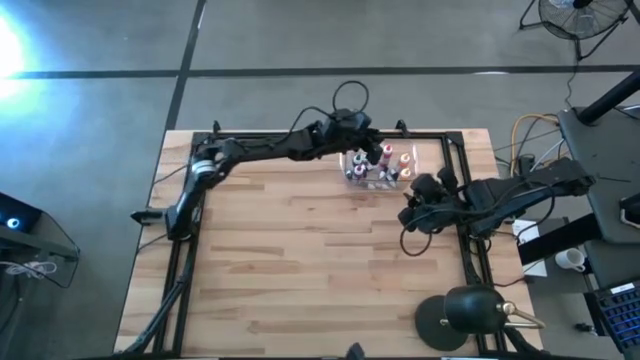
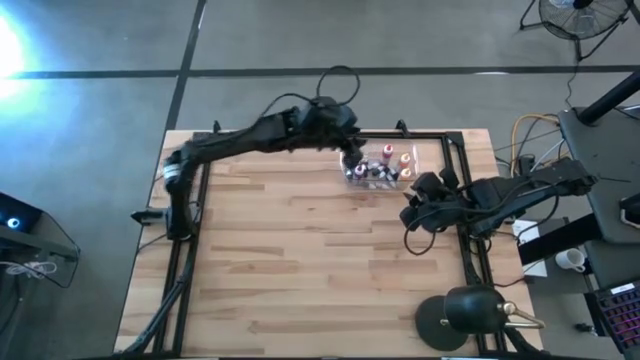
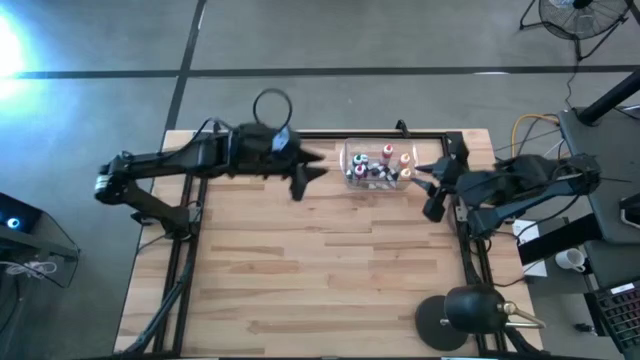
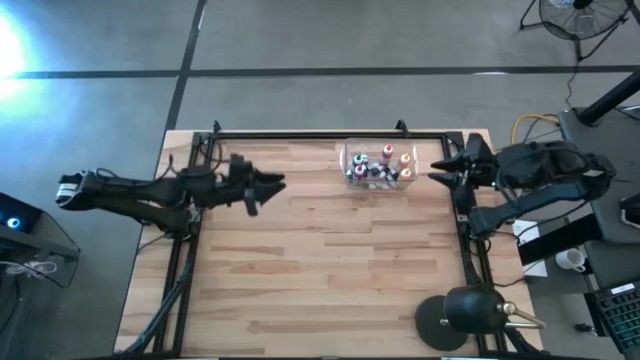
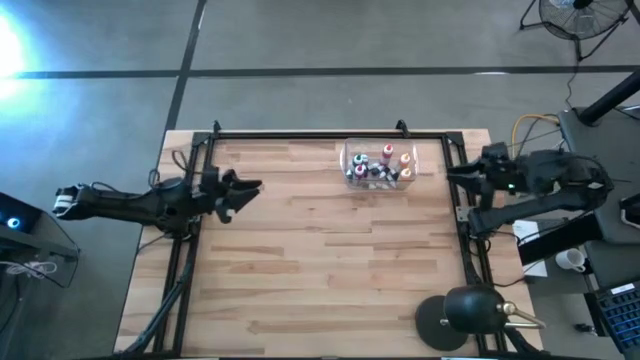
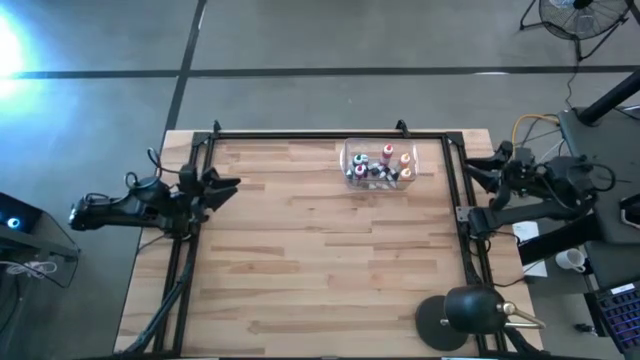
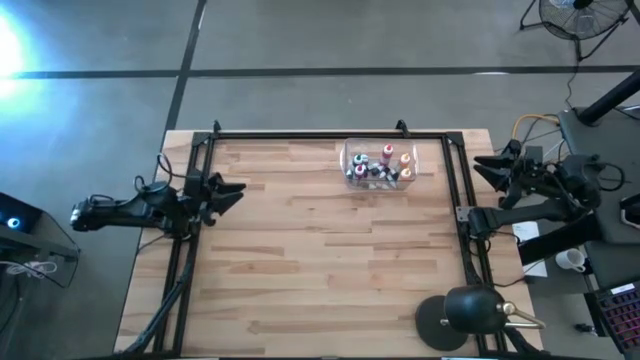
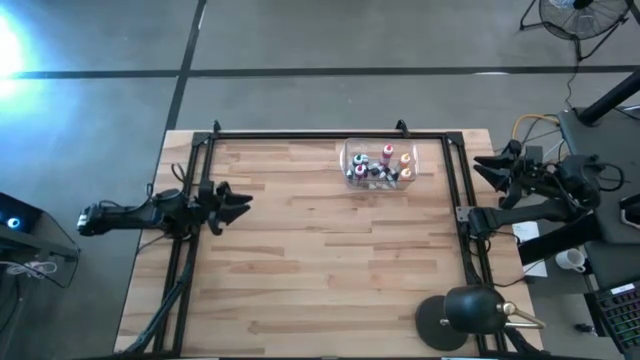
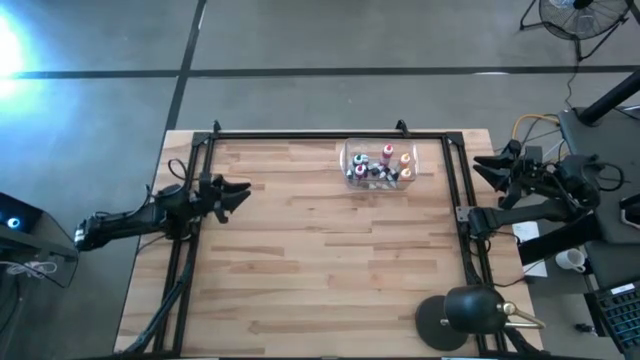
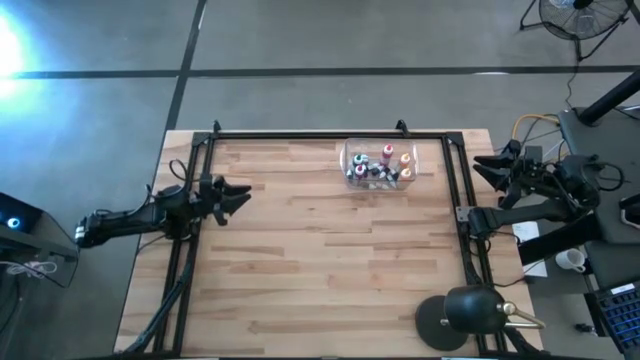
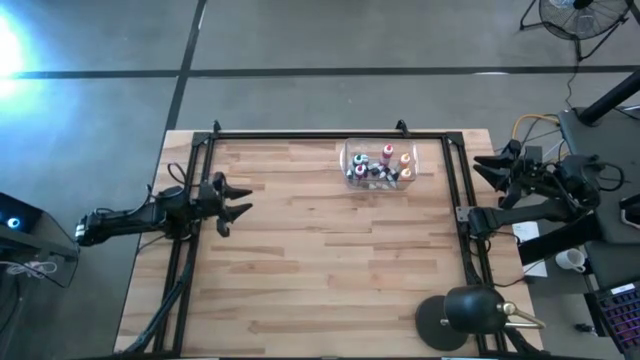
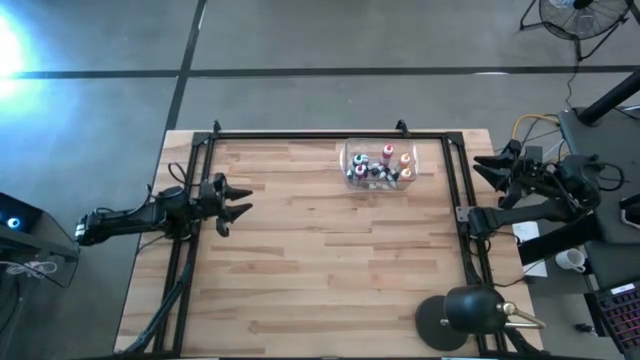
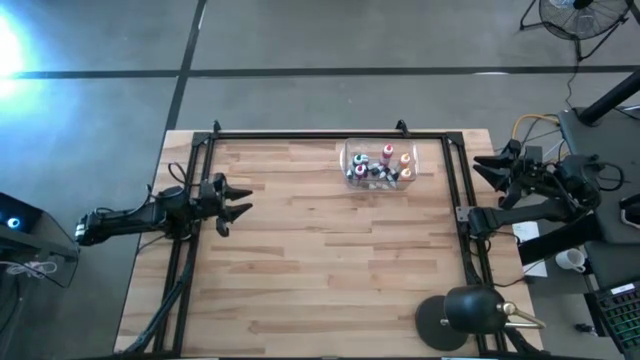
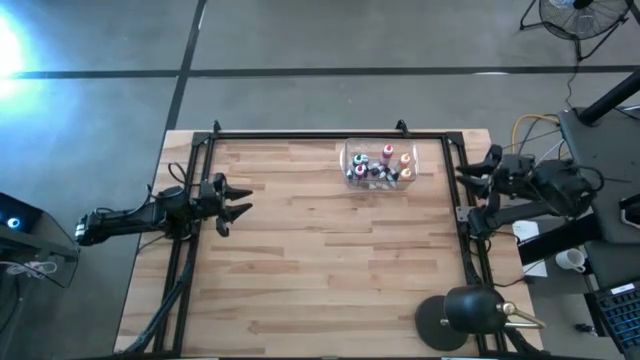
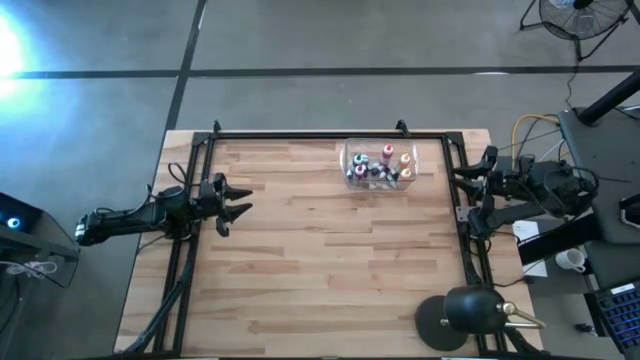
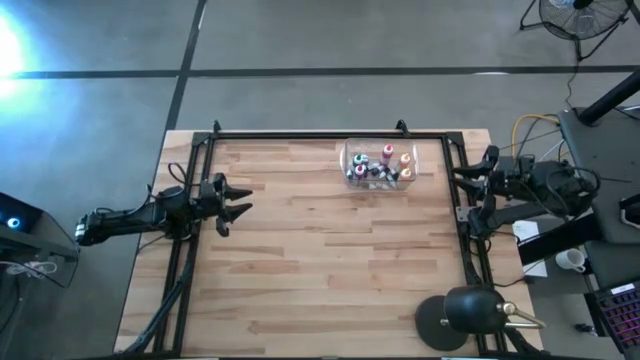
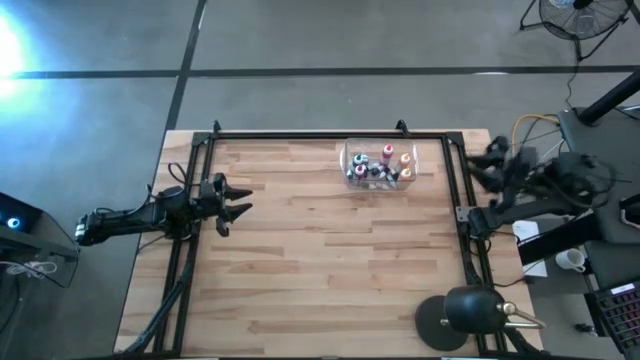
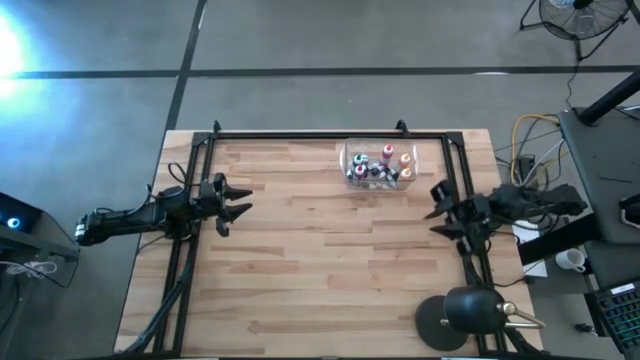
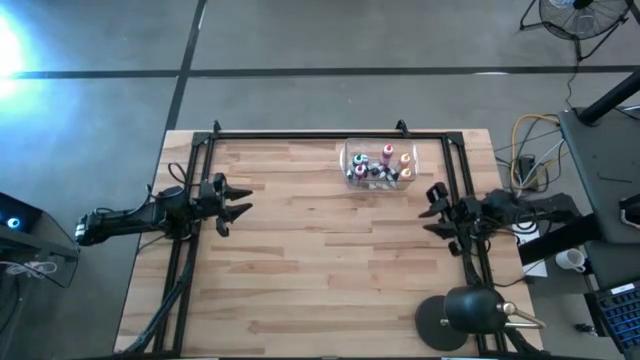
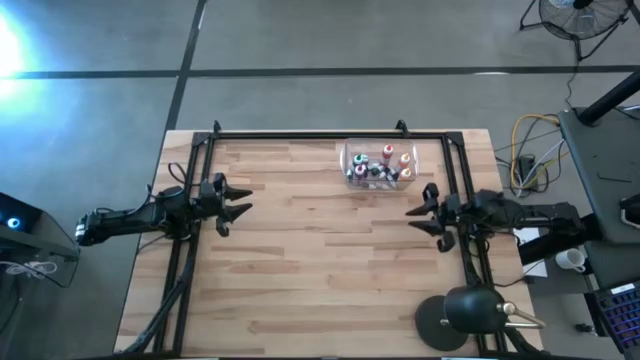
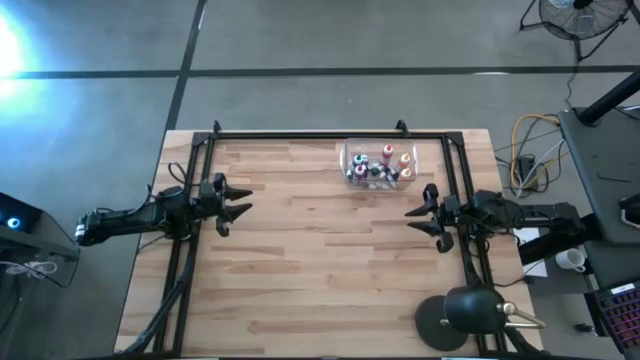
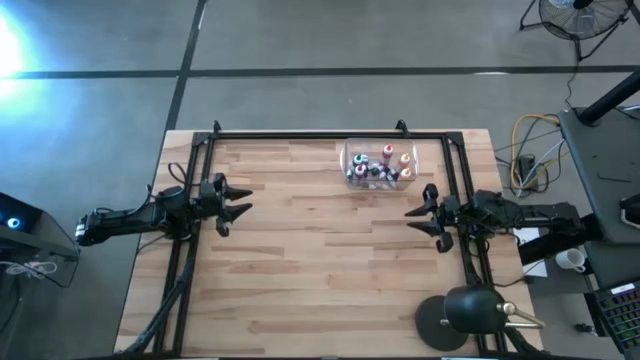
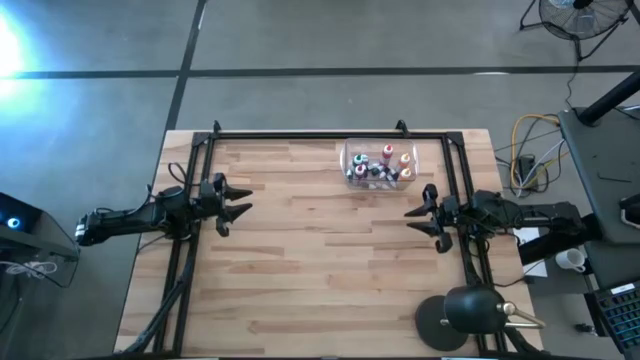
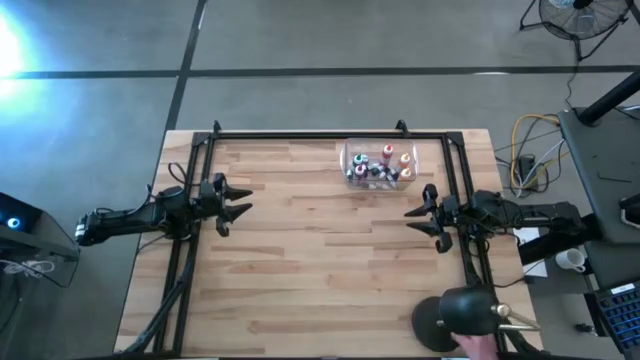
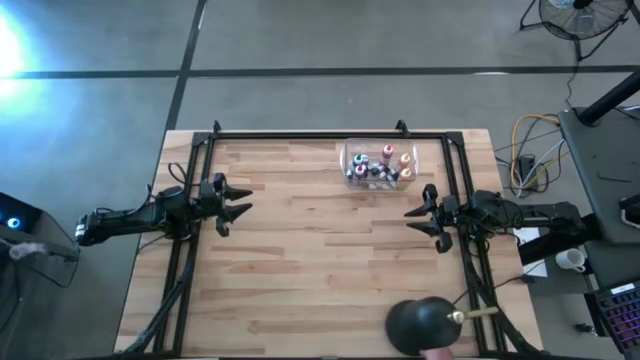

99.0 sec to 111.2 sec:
Task: Pick & Place food coloring
Return to Home Position

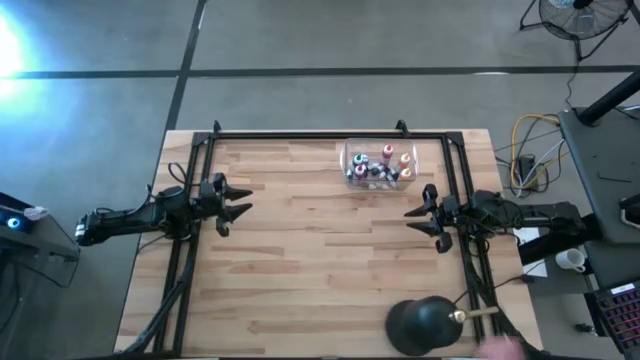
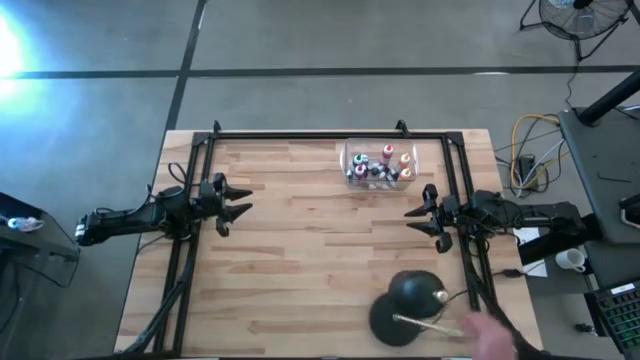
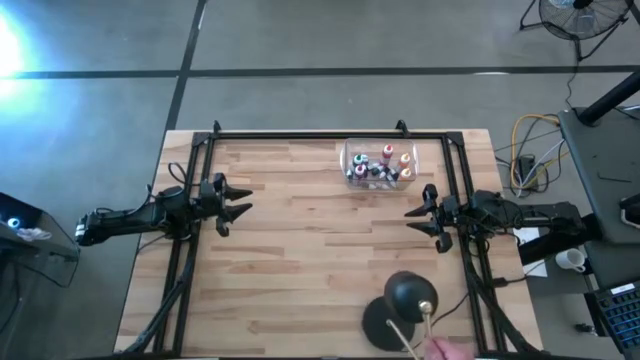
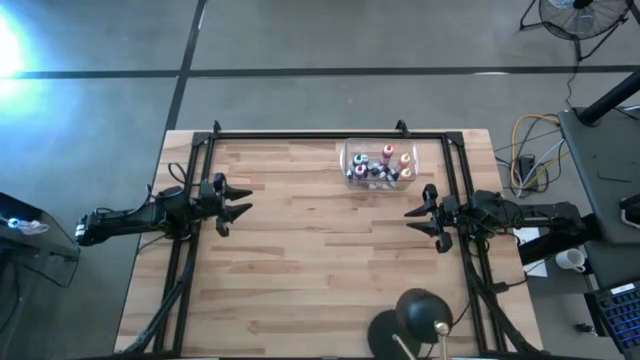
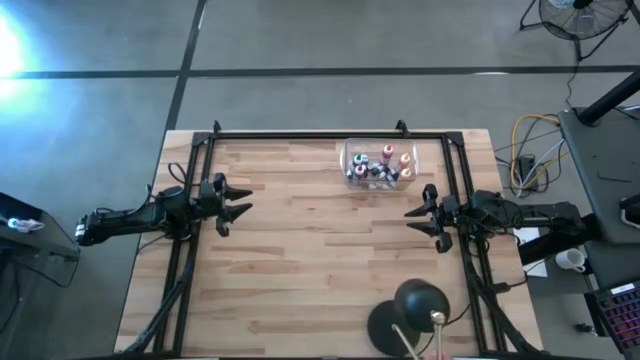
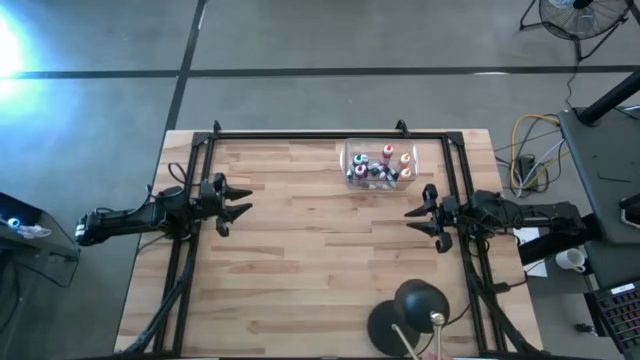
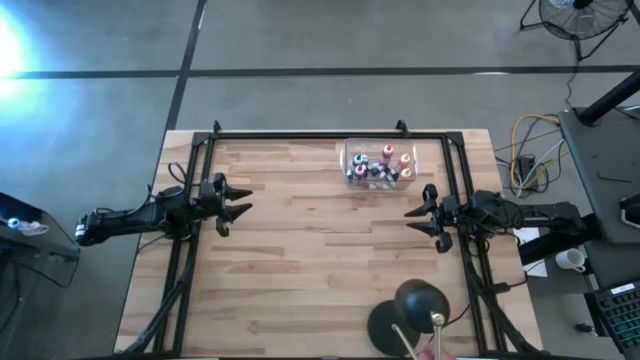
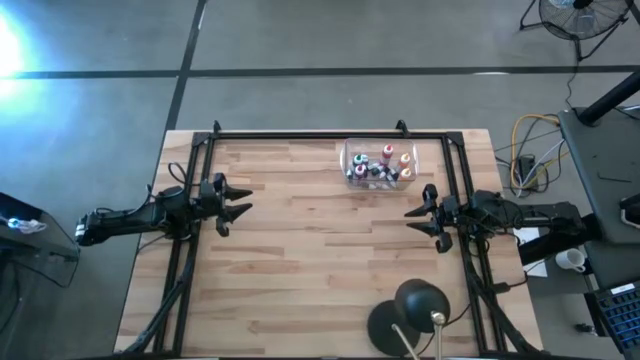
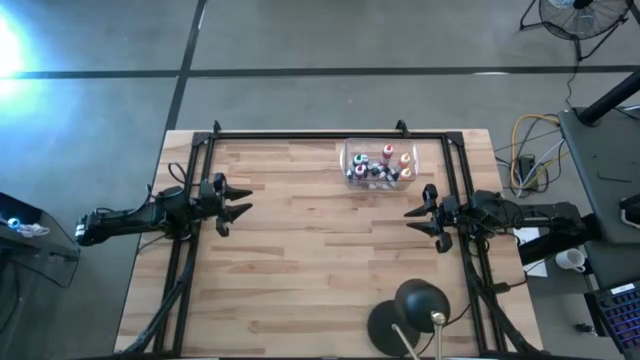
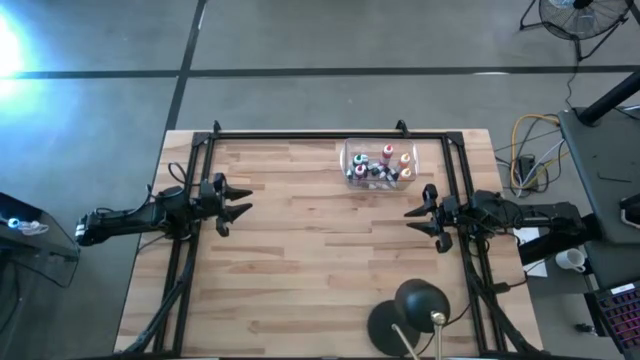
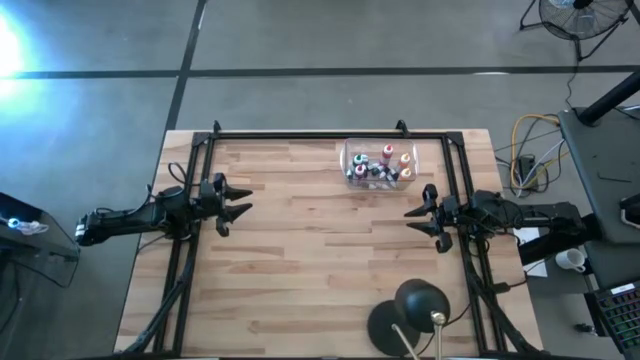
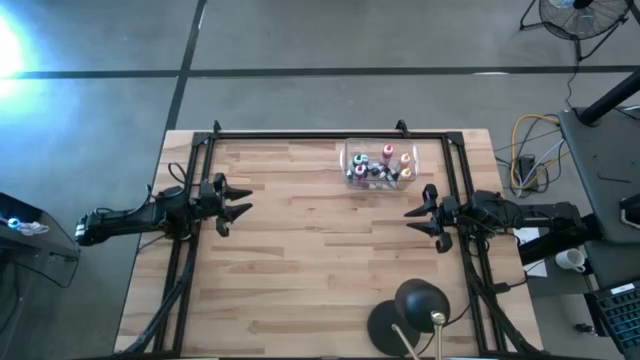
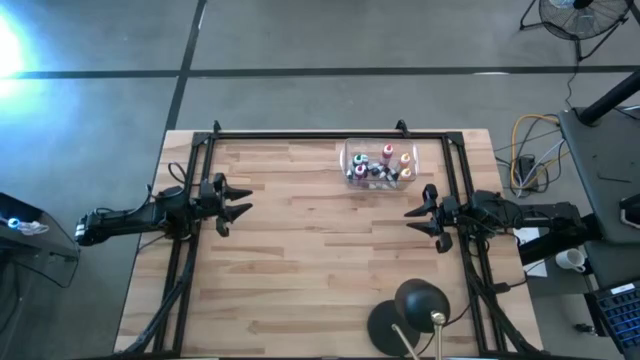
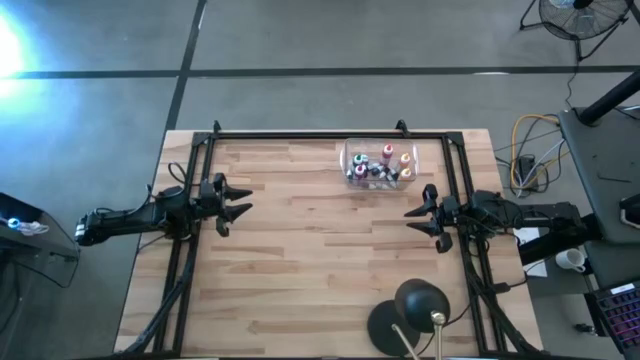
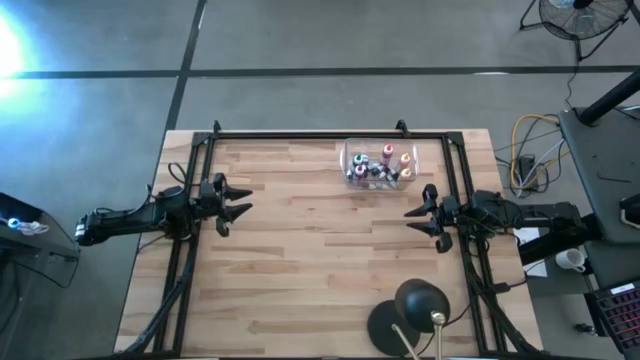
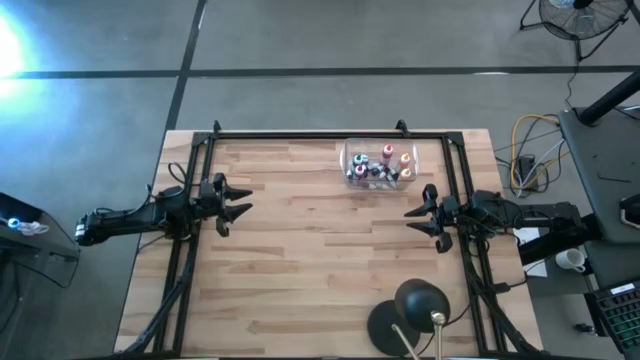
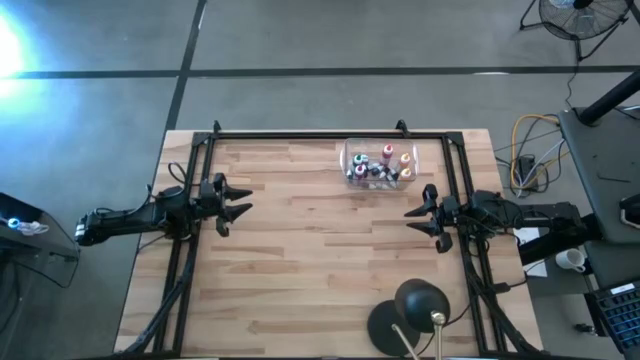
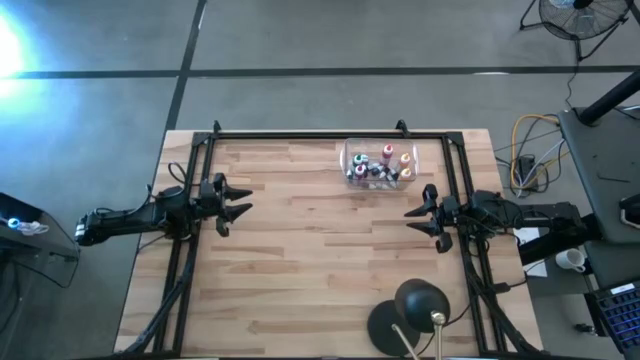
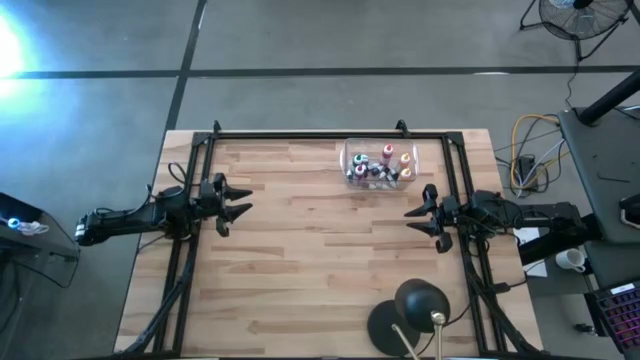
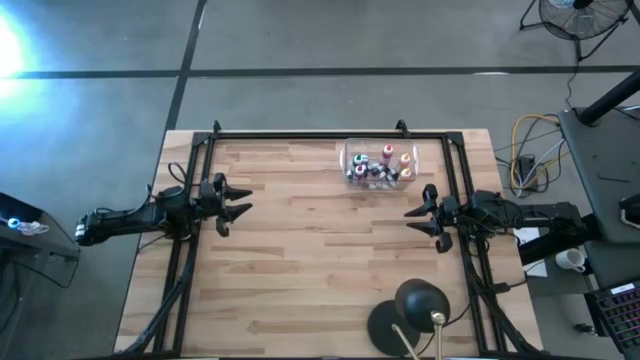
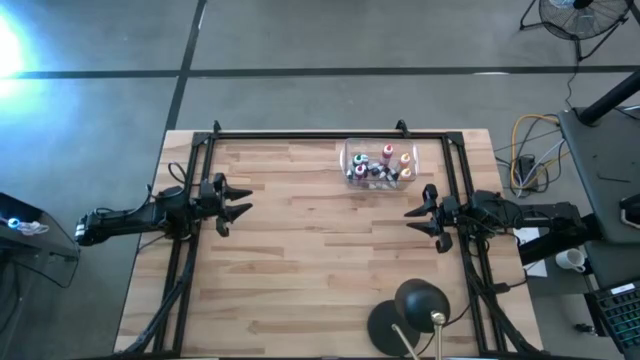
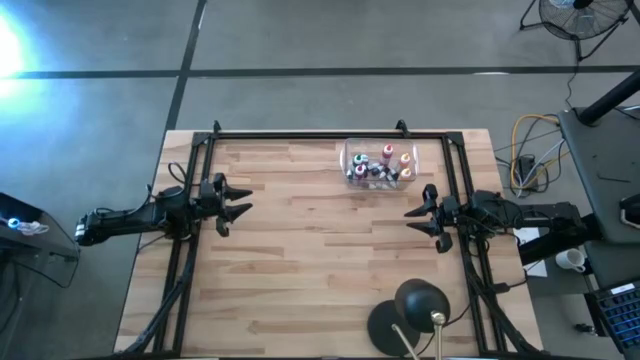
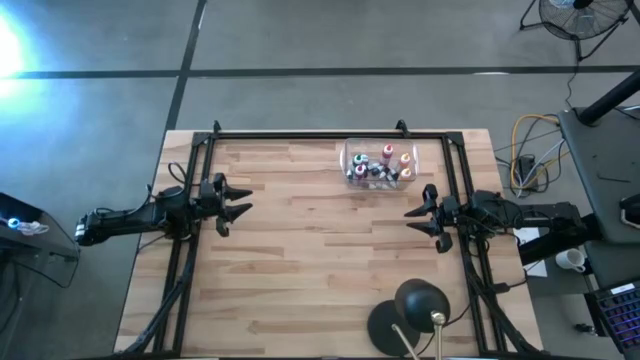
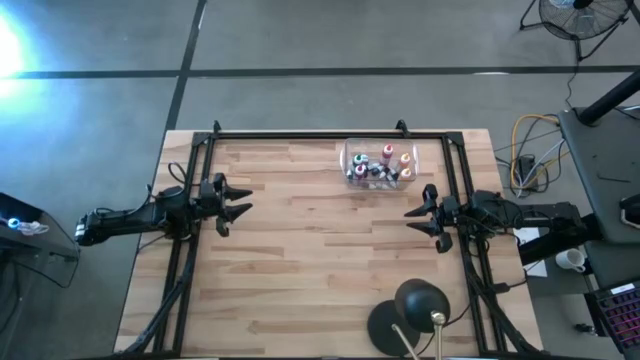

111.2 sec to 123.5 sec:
Return to Home Position
